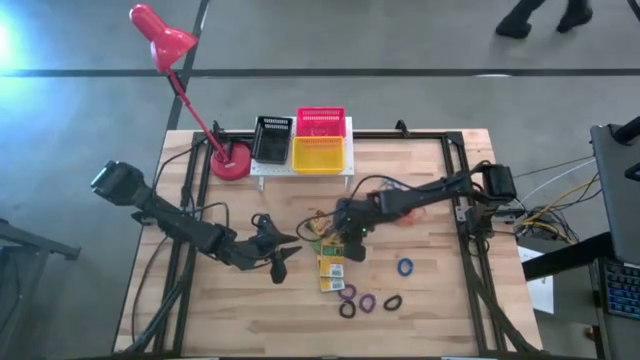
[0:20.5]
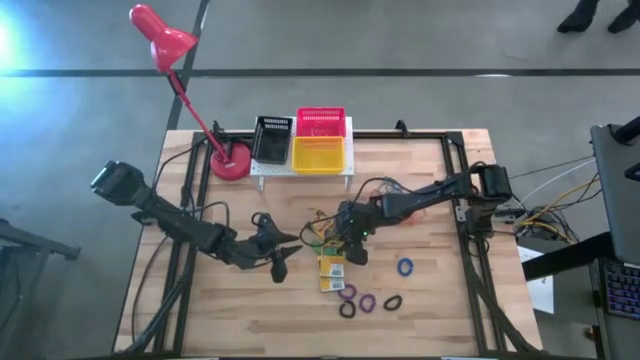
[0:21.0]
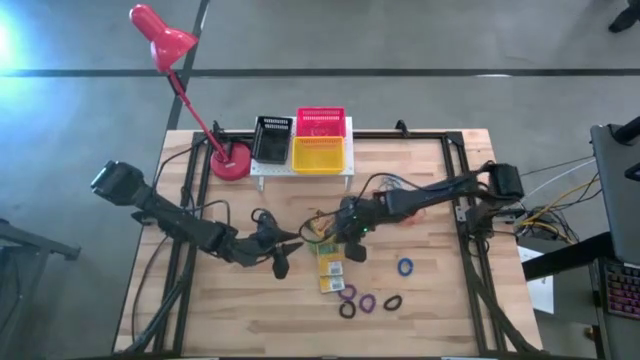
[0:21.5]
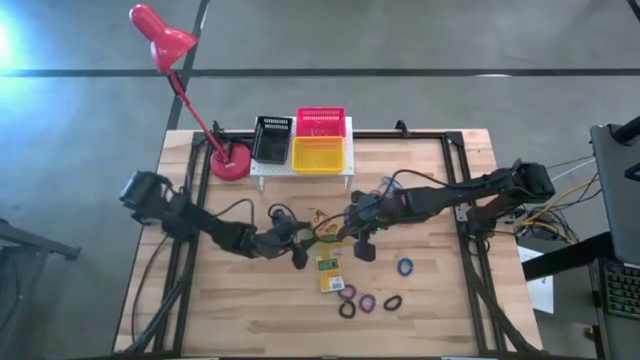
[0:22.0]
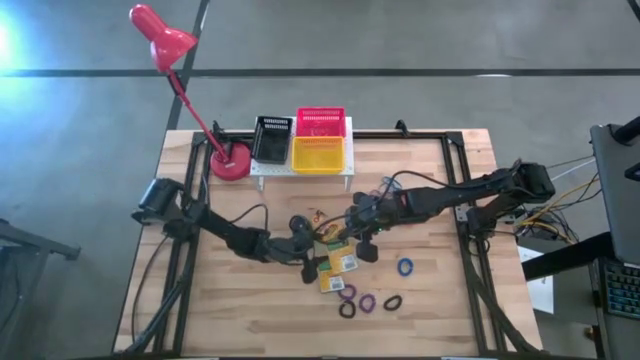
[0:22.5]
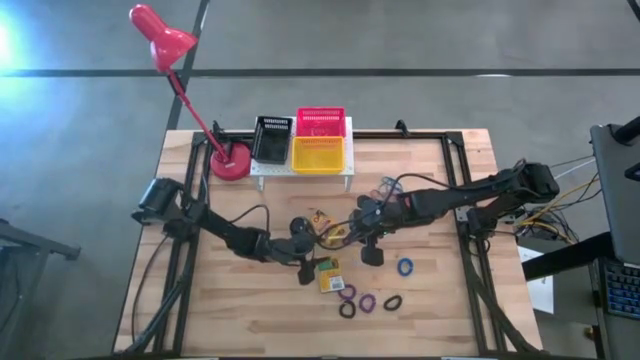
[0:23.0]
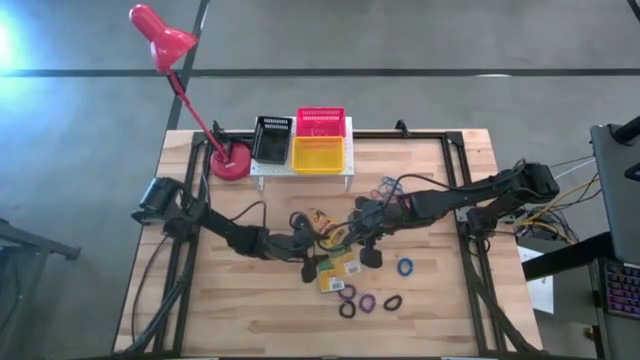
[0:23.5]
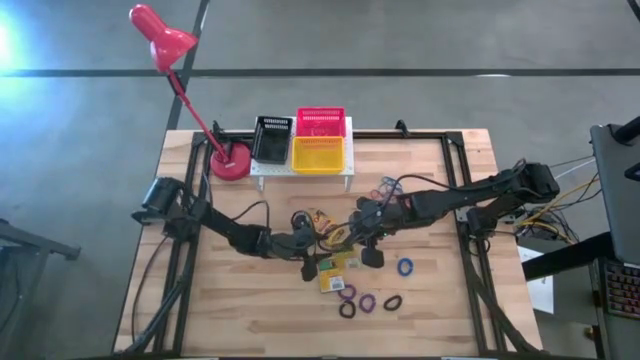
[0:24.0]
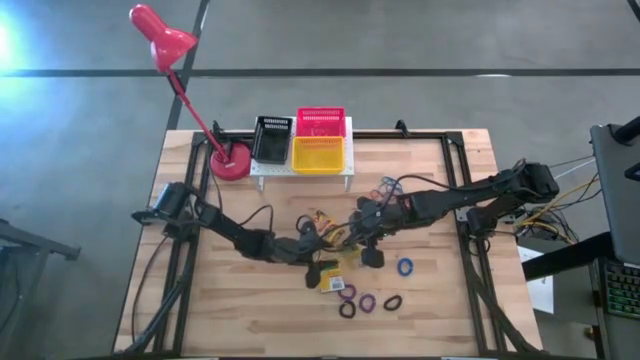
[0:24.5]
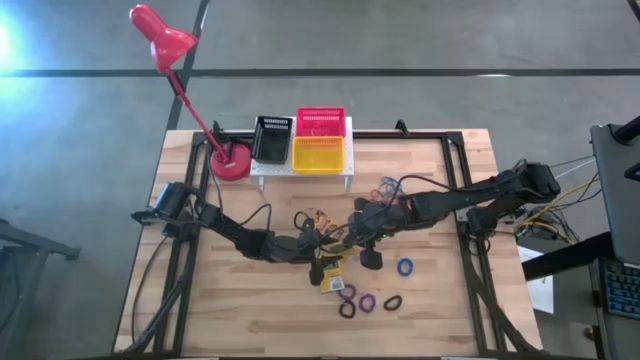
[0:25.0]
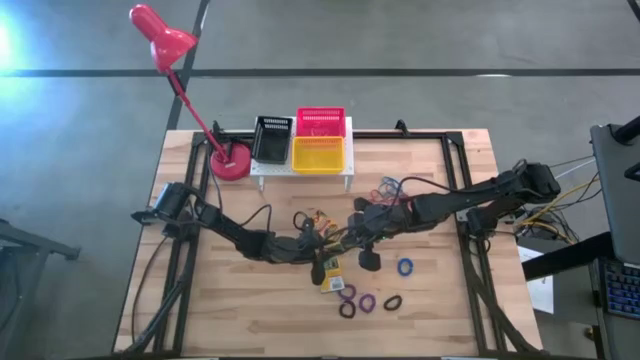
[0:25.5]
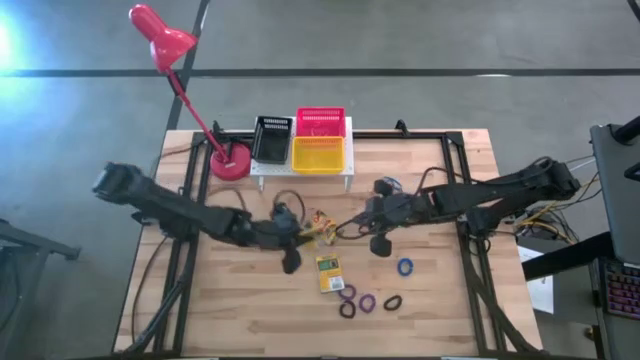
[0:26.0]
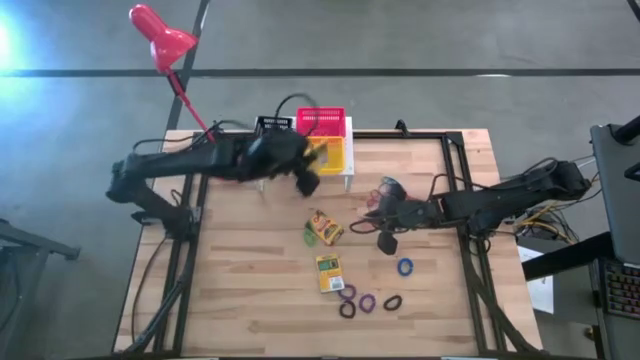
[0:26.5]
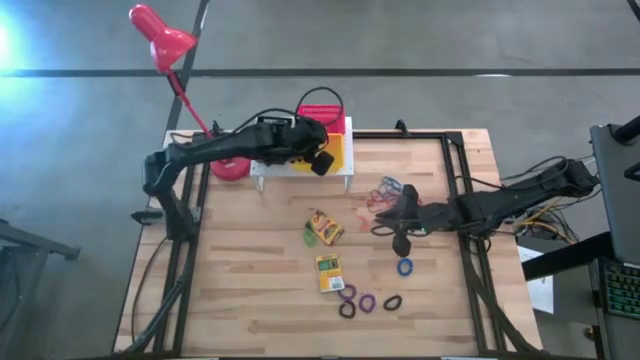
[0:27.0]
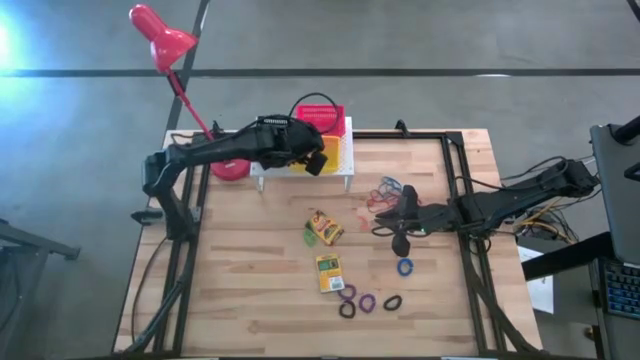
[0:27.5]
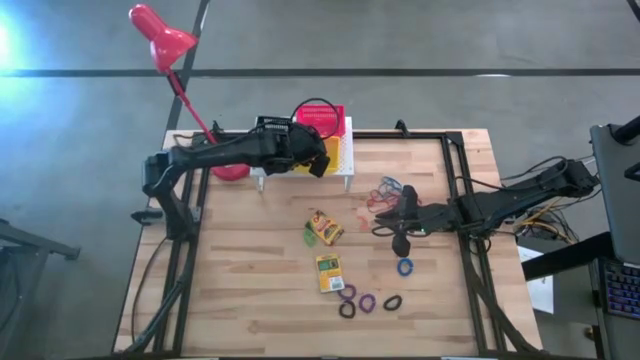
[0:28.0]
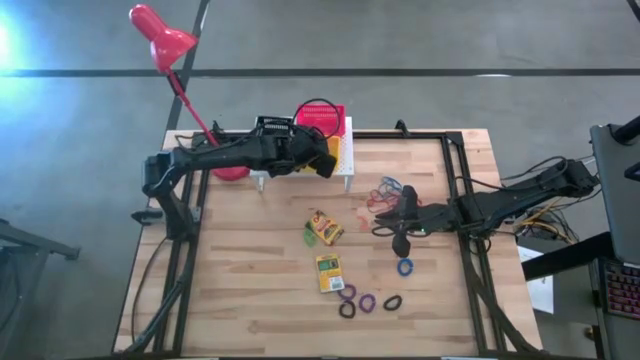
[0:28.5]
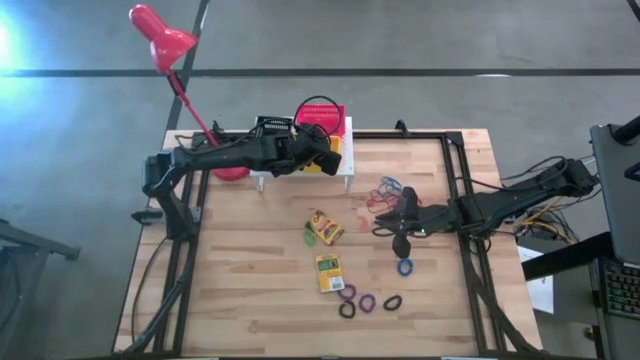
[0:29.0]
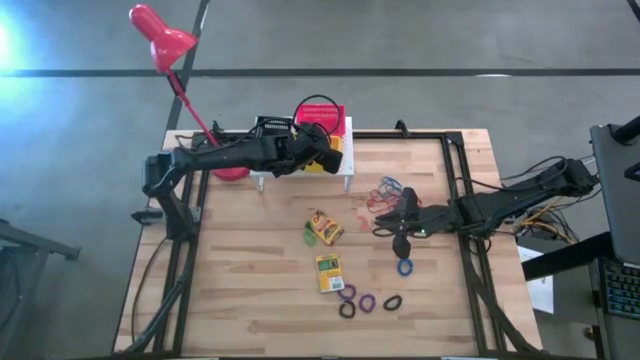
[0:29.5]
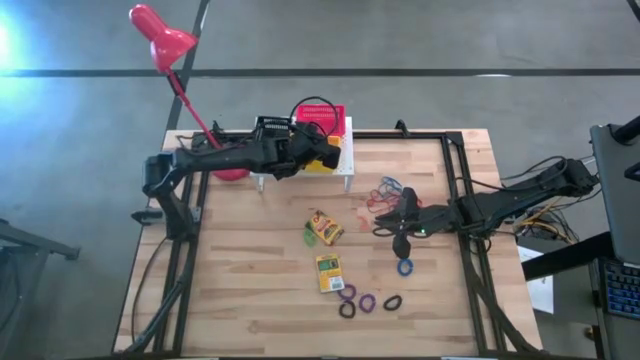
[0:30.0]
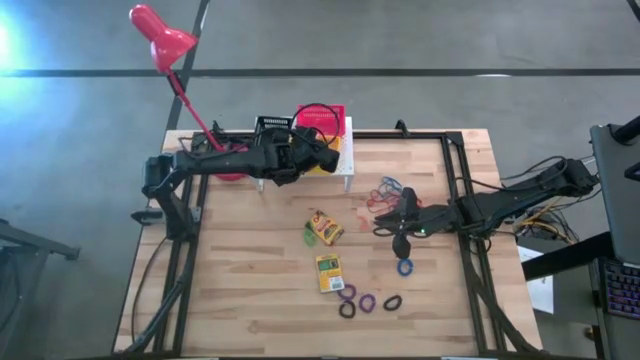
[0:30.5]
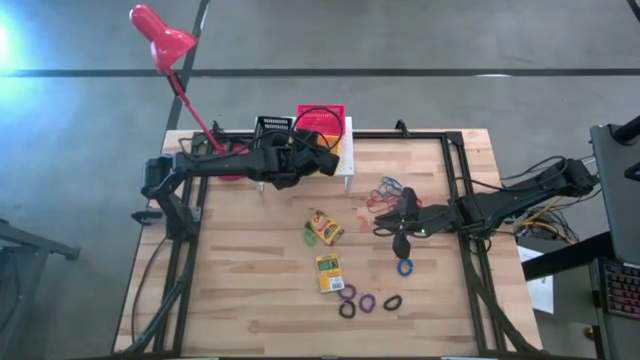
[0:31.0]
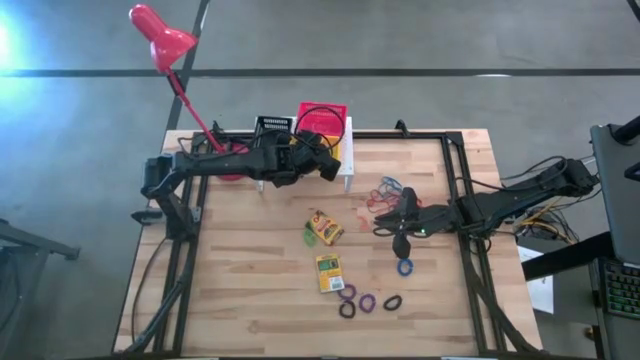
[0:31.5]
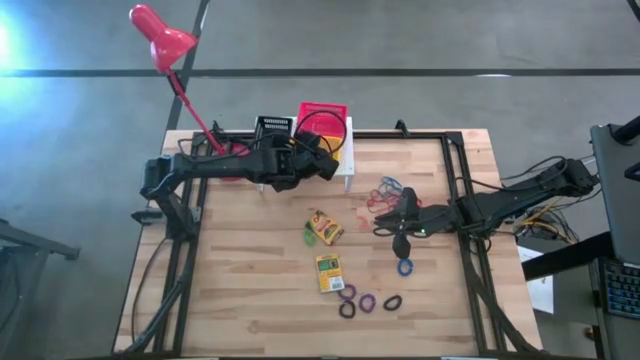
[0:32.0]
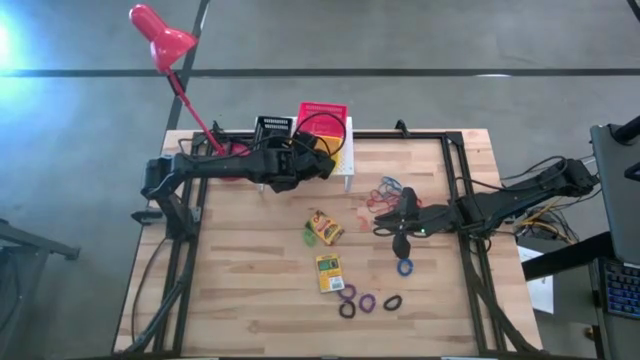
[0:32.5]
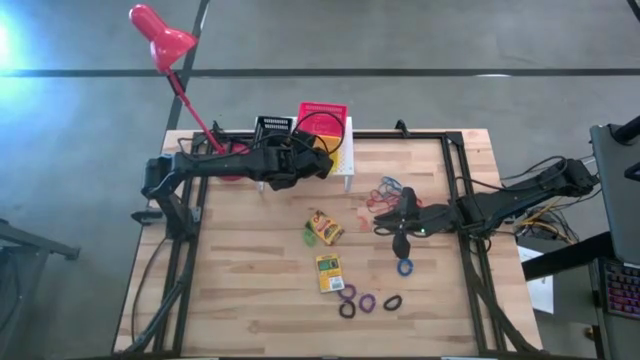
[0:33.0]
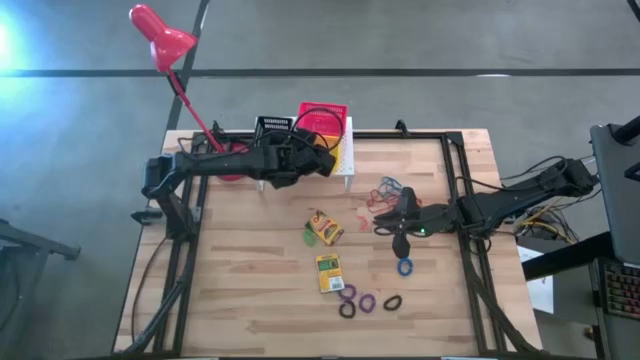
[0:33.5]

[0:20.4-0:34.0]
Task: Pick & Place Office Desk Supplies
Put the center yellow crayon box into the yellow bin on the shelf

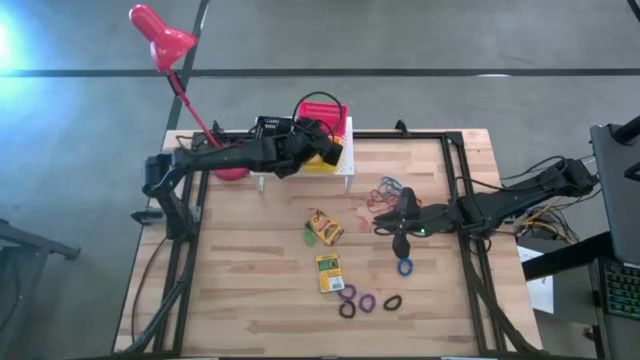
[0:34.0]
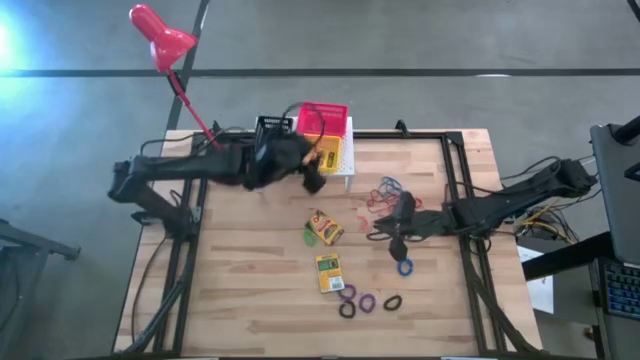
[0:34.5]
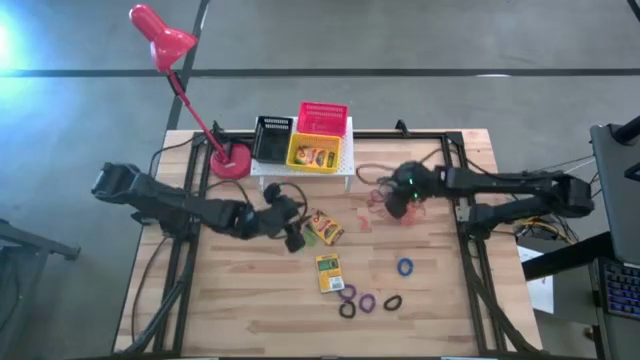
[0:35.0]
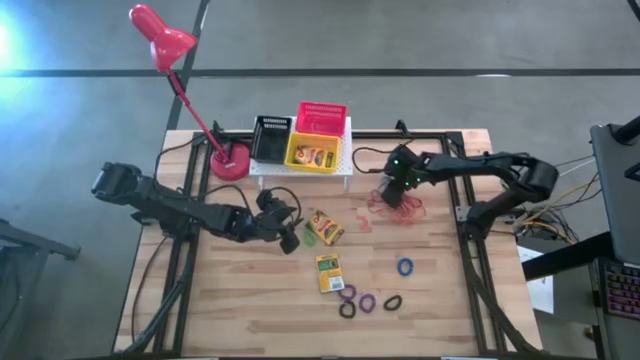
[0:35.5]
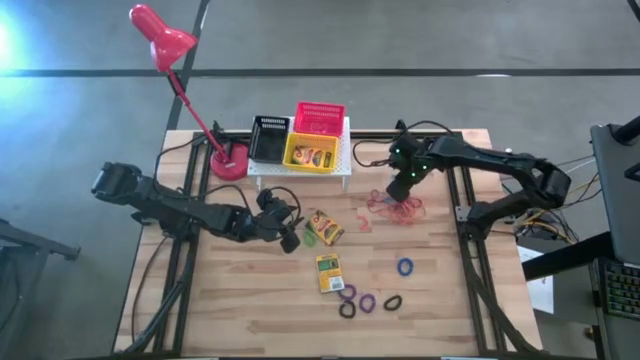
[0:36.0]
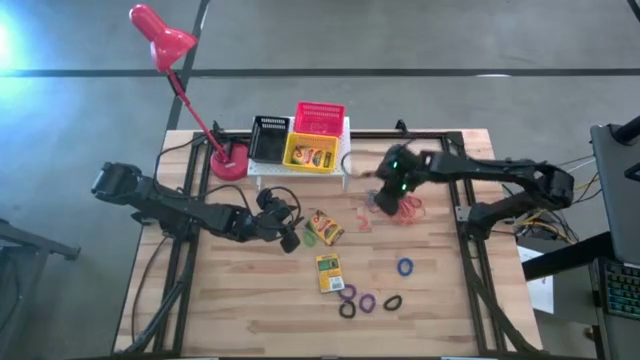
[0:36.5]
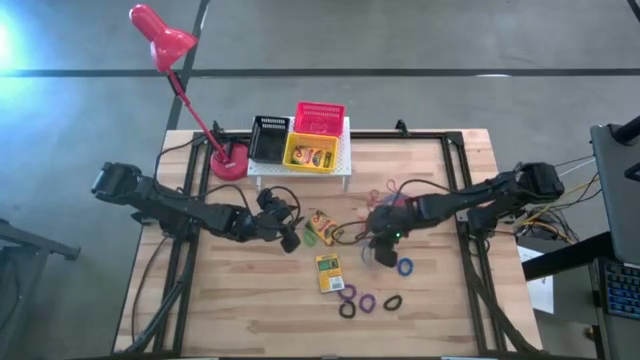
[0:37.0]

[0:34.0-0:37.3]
Put the blue rubber band into the red bin on the shelf on the shelf

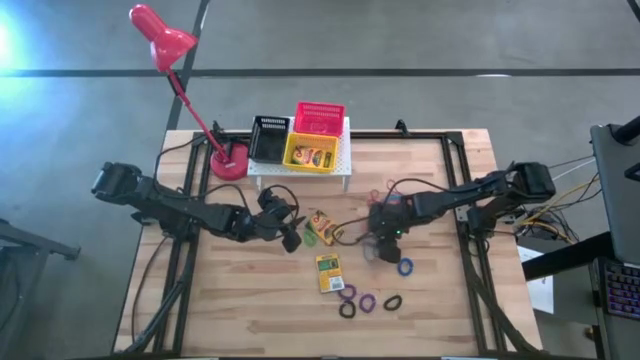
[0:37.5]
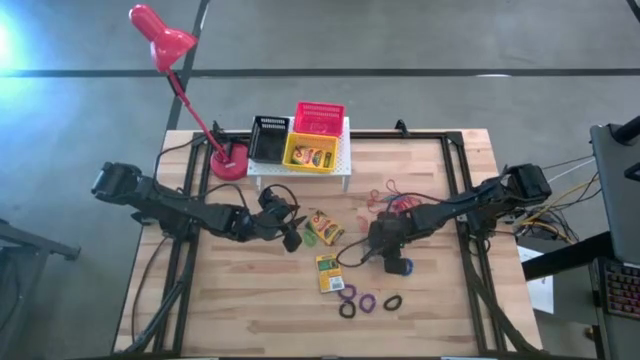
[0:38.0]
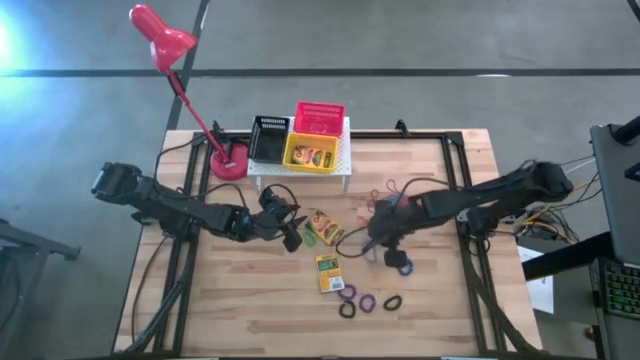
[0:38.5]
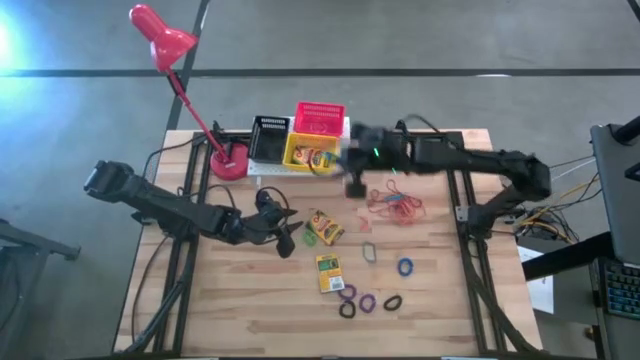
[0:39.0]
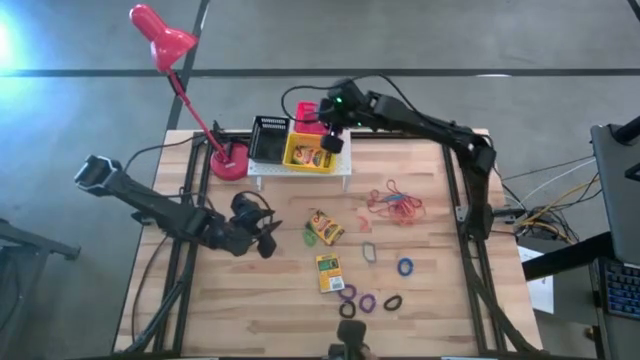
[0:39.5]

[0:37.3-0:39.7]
Put the blue rubber band into the red bin on the shelf on the shelf

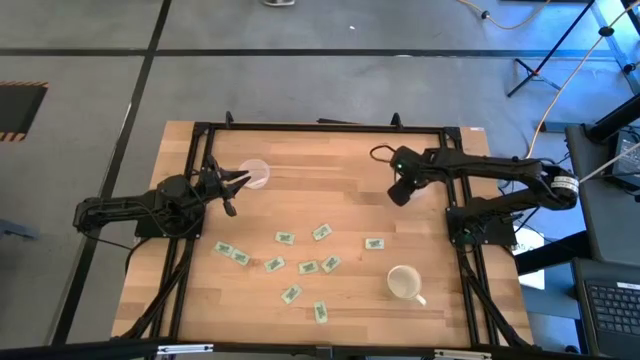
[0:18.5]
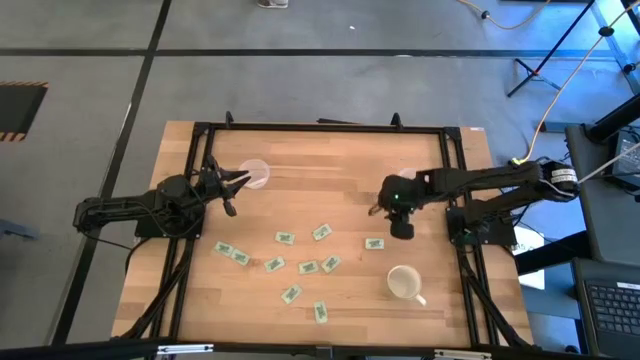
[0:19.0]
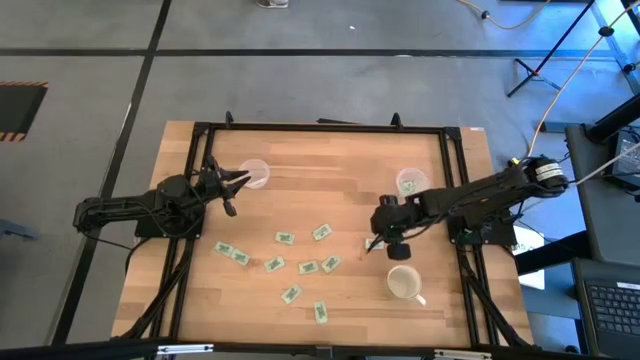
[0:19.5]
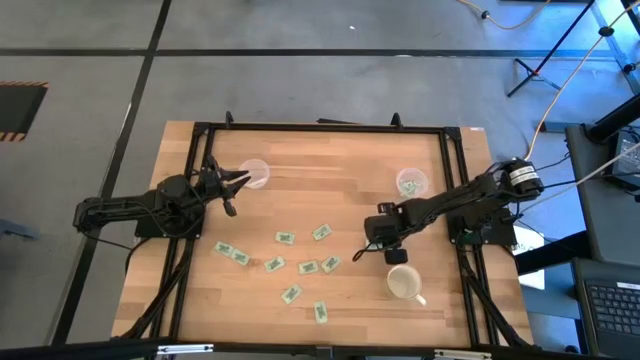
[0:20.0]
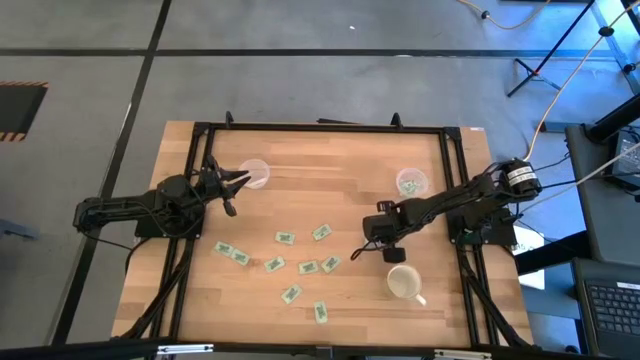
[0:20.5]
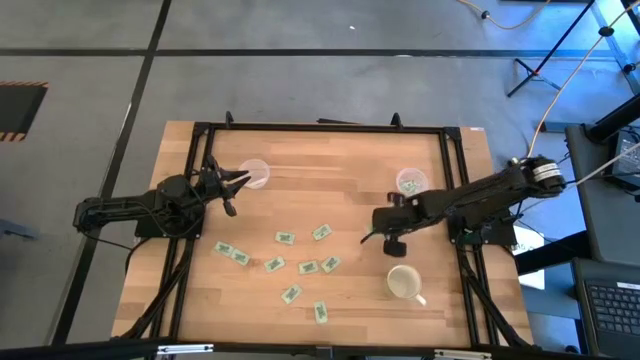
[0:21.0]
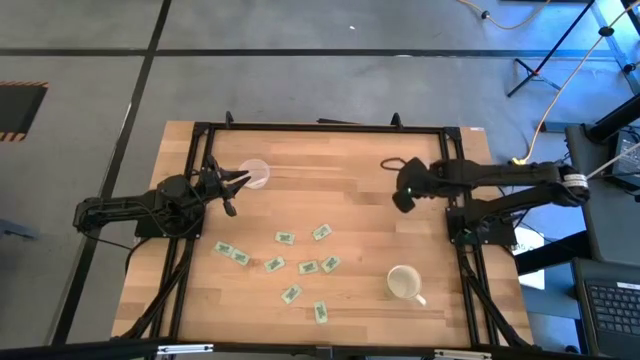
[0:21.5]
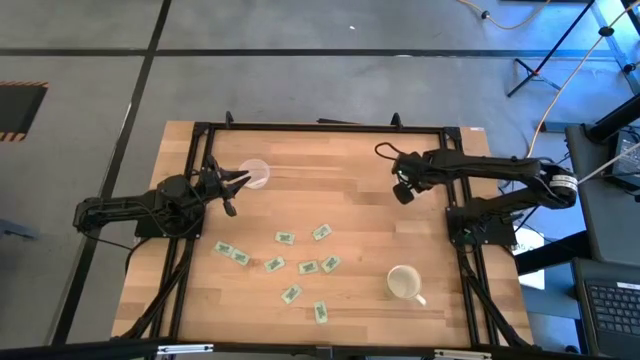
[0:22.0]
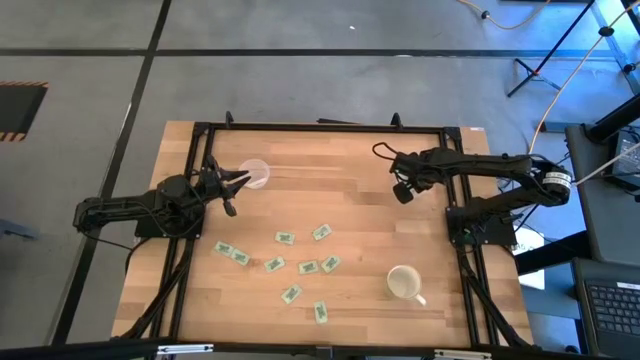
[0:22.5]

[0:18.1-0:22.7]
Task: Pick and place Stevia / Truvia into bins
Put the stevia packet into the right transparent container
